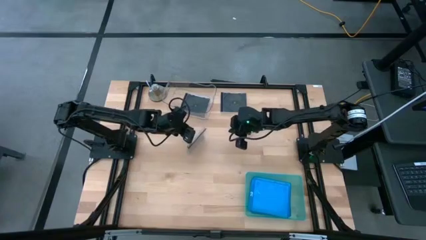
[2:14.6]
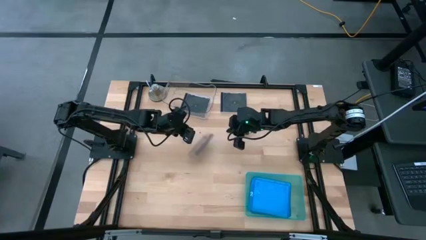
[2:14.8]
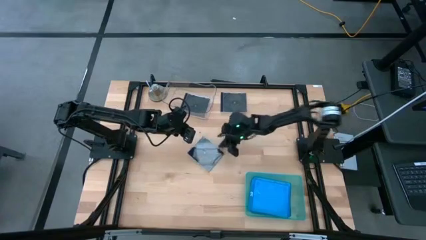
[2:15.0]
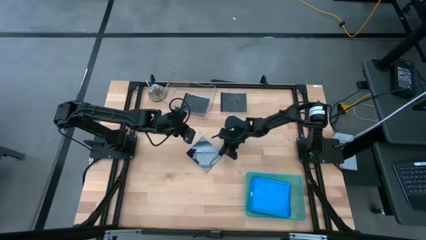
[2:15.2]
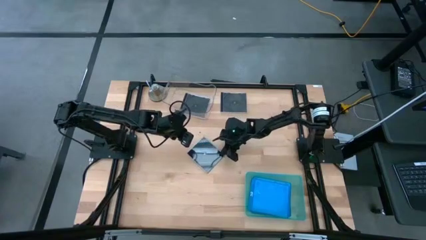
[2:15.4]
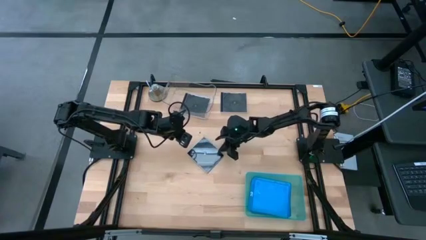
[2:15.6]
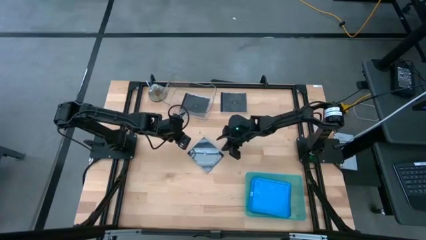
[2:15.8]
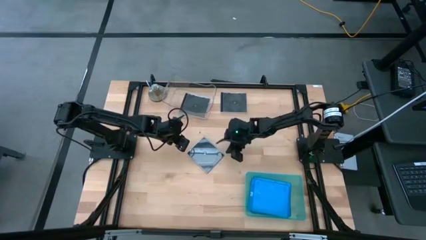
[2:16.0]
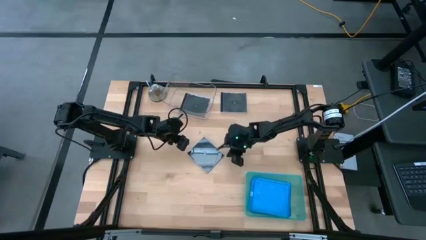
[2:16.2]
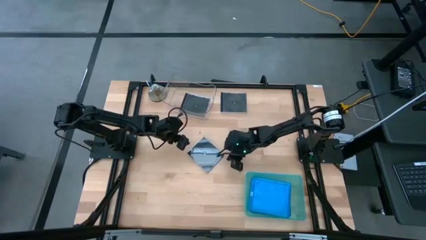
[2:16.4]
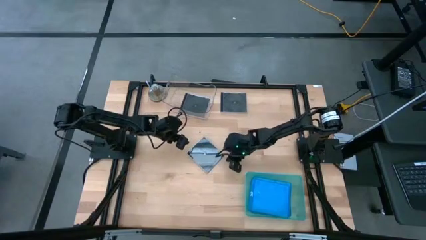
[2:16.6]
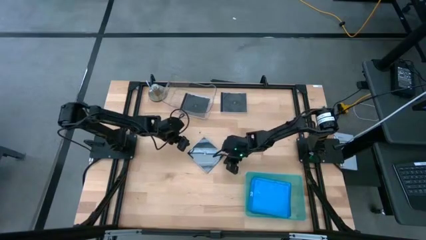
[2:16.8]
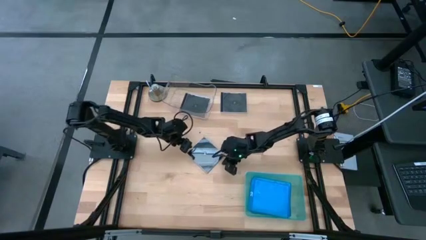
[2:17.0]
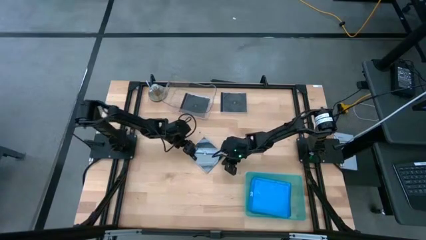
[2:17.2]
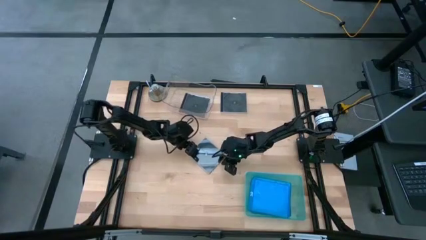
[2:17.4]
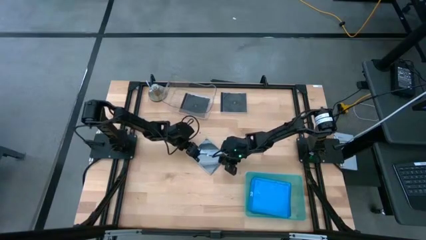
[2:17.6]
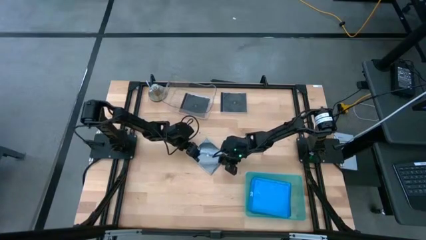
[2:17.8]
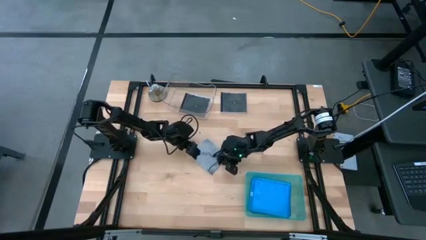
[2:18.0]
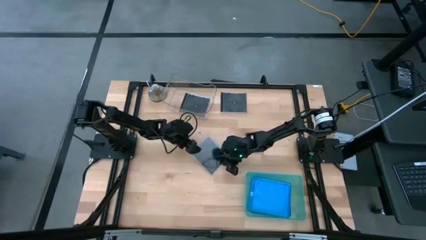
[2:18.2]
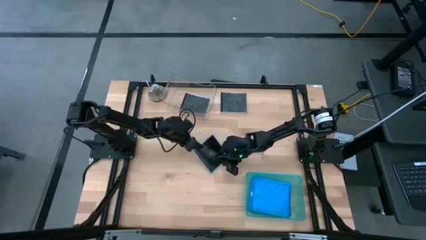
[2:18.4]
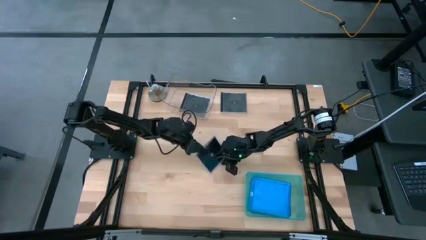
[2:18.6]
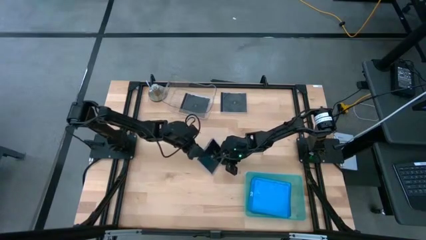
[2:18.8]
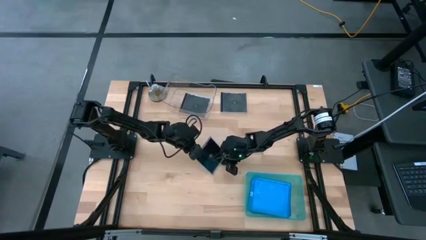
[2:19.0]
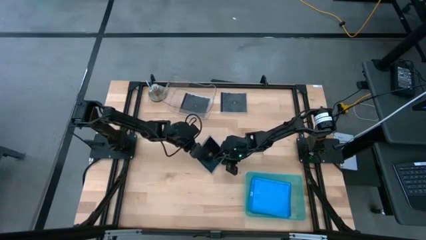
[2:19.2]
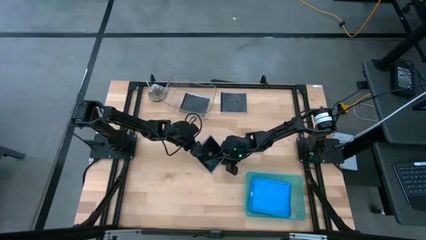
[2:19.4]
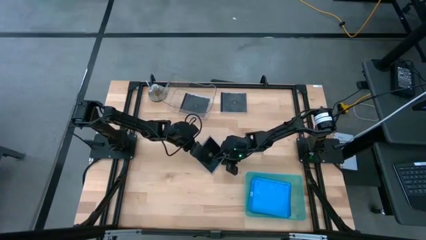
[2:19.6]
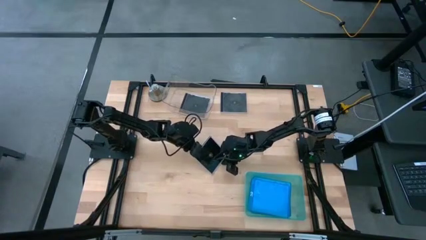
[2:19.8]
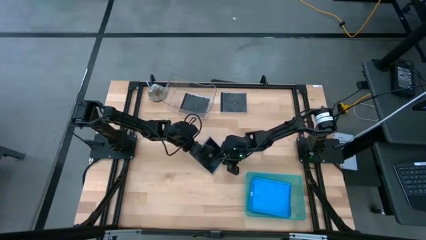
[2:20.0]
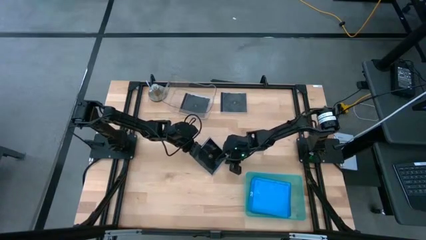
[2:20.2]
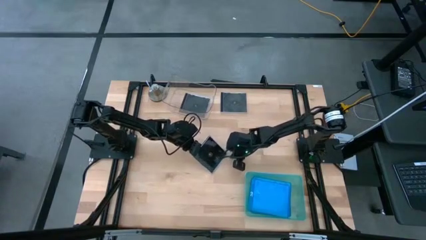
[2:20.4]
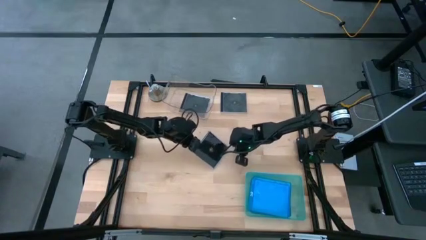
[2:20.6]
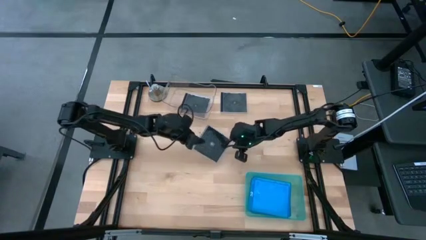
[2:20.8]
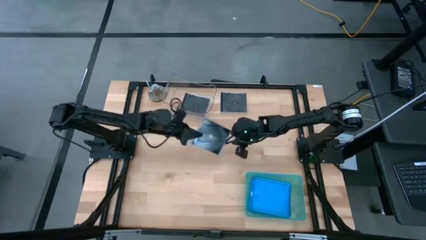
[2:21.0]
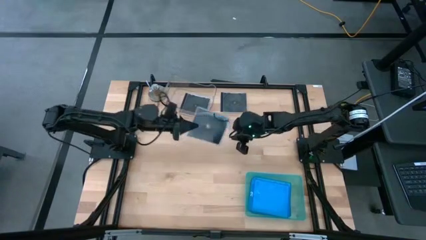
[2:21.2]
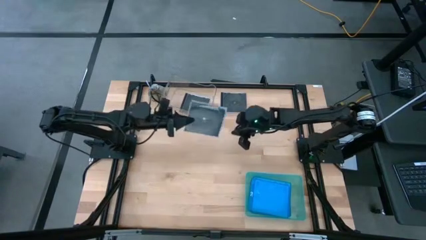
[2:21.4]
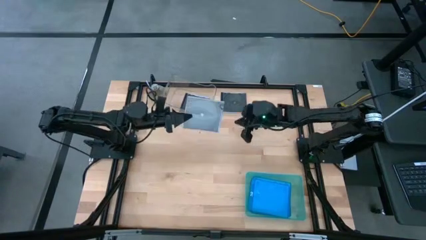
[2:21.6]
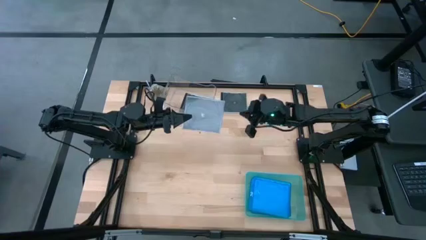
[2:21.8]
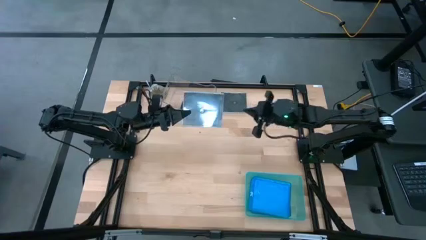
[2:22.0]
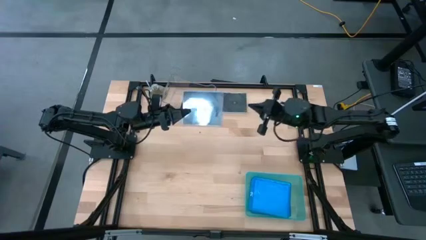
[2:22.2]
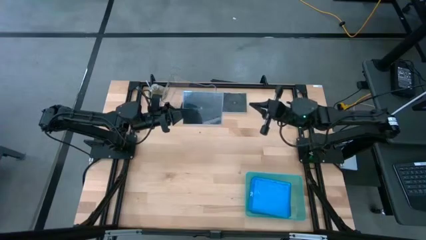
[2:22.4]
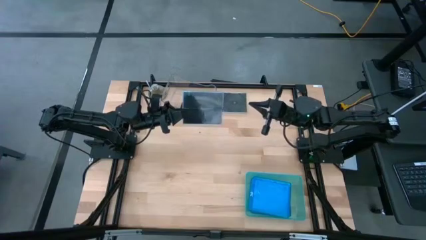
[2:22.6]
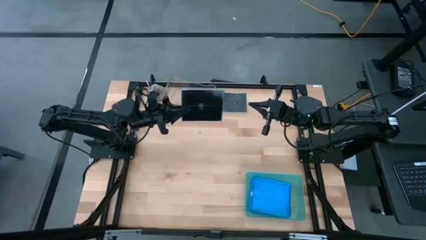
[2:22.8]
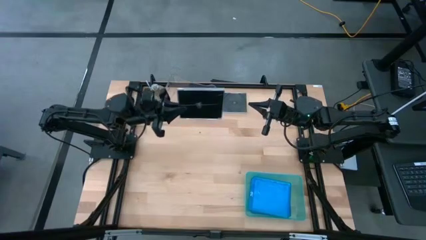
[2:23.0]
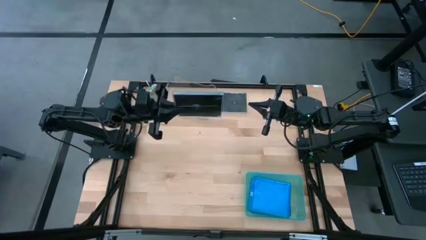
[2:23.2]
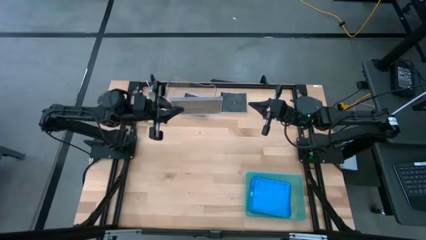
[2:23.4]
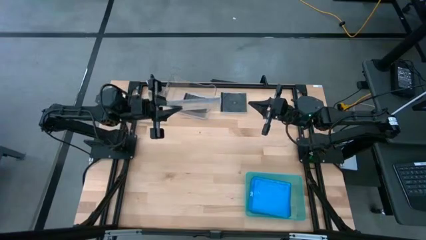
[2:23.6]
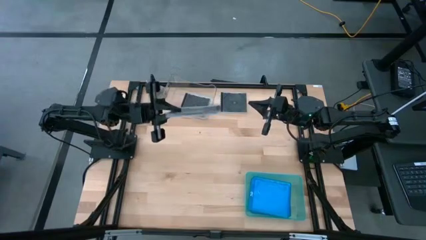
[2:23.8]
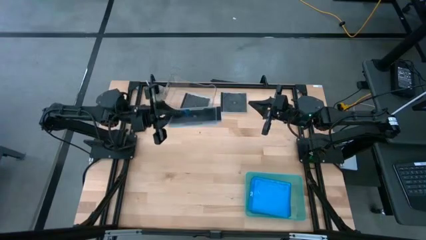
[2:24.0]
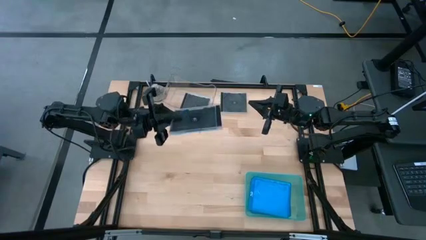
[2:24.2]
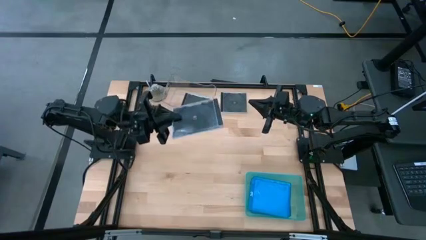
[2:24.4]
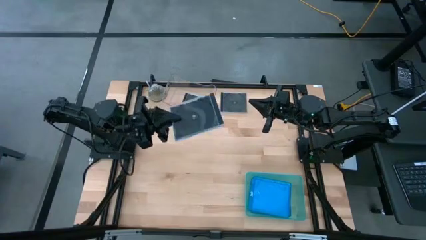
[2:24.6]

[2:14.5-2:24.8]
Task: Pick & place jewel cases by type
Put the bottom black cd case into the transparent bin

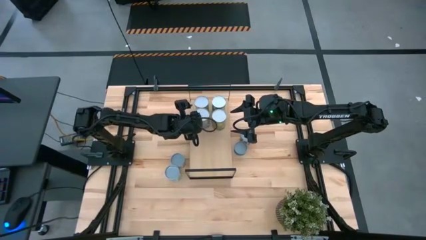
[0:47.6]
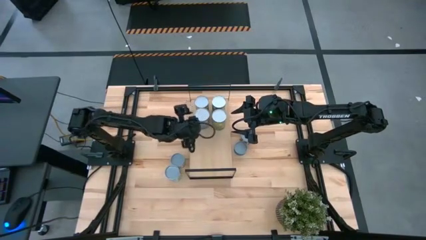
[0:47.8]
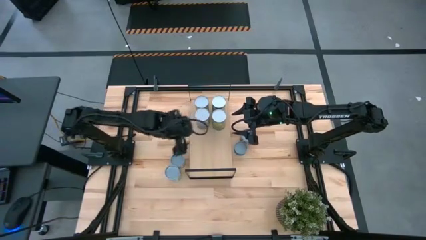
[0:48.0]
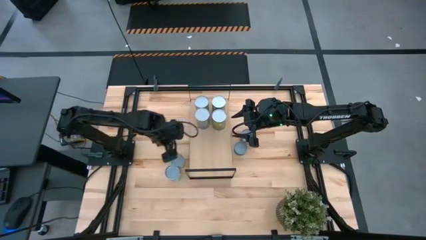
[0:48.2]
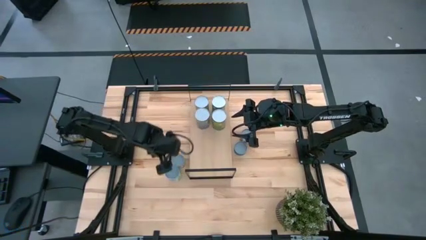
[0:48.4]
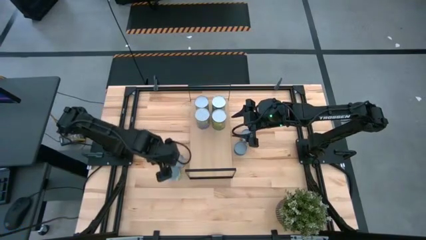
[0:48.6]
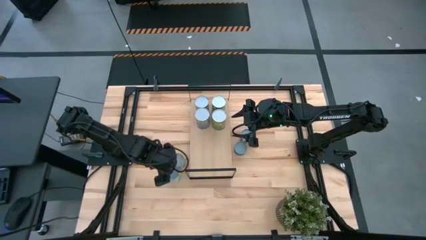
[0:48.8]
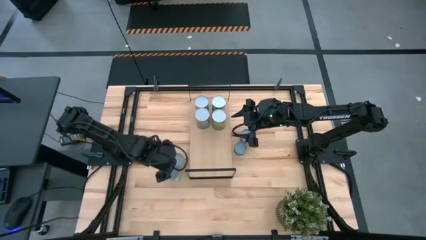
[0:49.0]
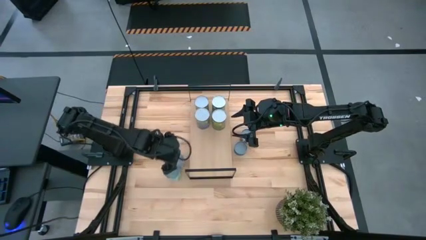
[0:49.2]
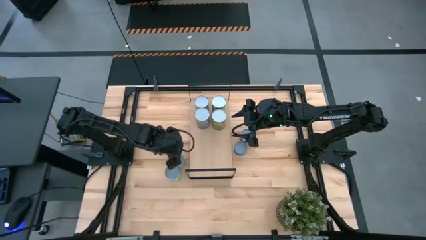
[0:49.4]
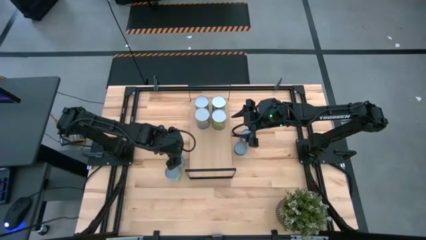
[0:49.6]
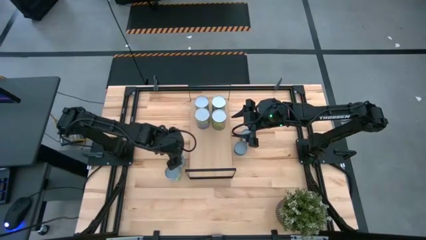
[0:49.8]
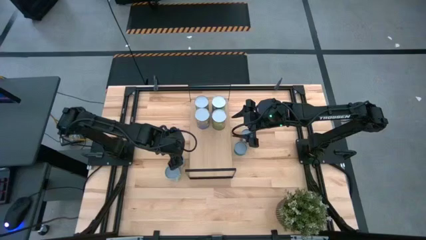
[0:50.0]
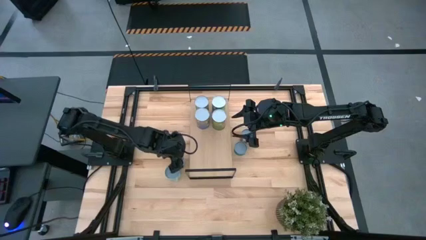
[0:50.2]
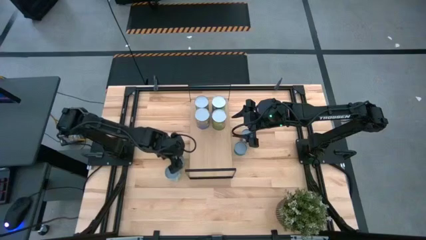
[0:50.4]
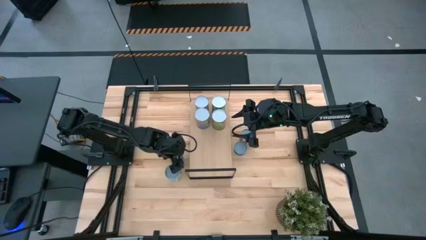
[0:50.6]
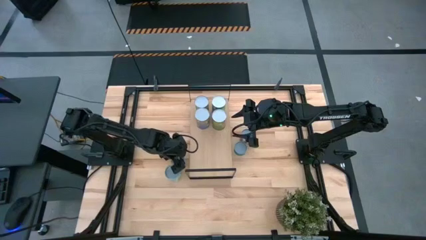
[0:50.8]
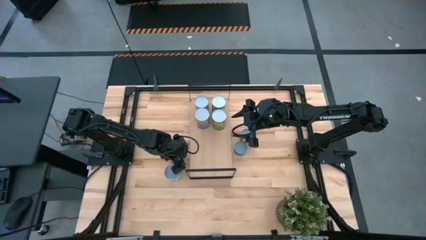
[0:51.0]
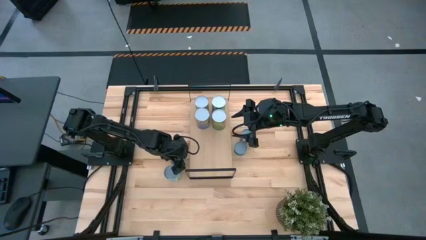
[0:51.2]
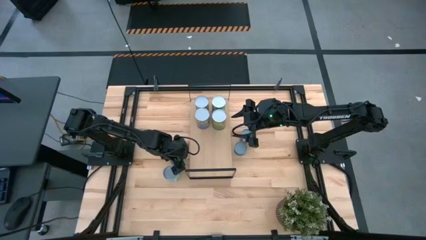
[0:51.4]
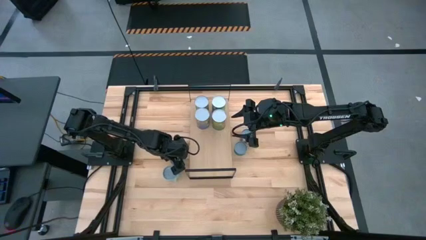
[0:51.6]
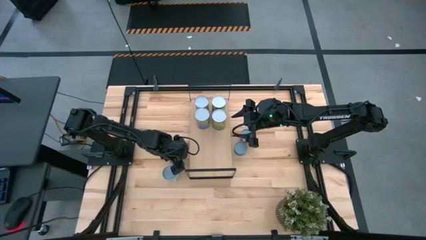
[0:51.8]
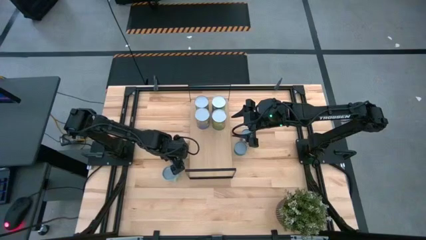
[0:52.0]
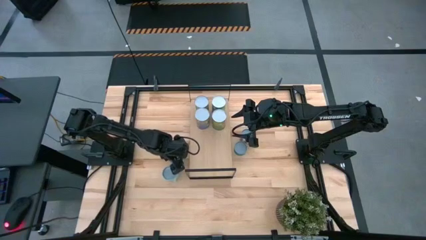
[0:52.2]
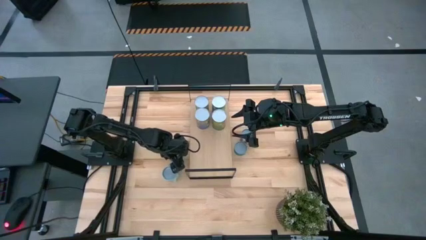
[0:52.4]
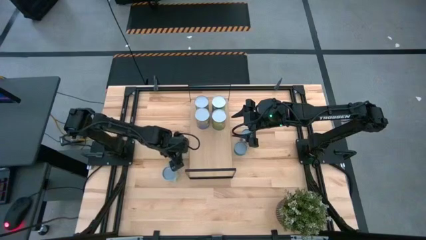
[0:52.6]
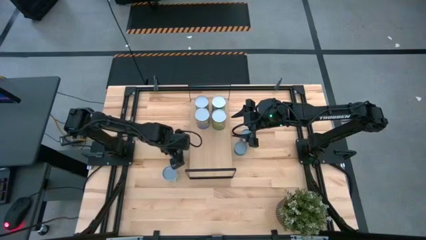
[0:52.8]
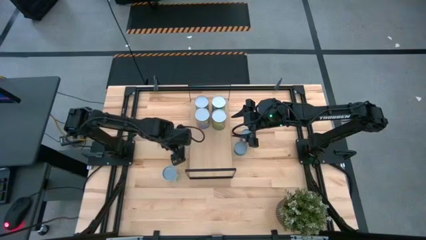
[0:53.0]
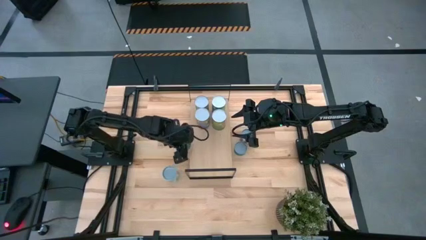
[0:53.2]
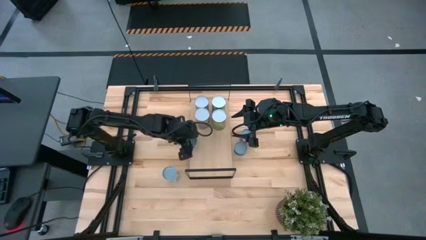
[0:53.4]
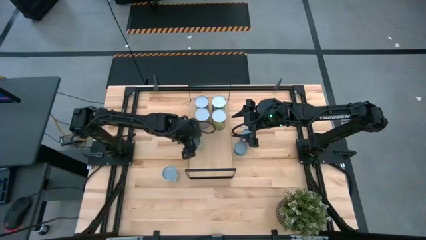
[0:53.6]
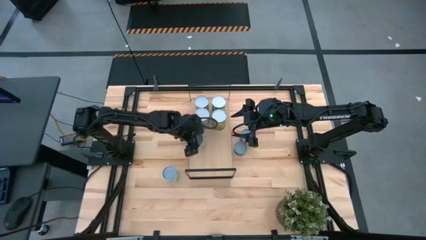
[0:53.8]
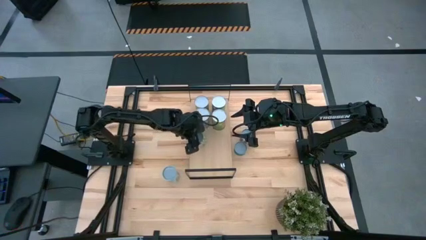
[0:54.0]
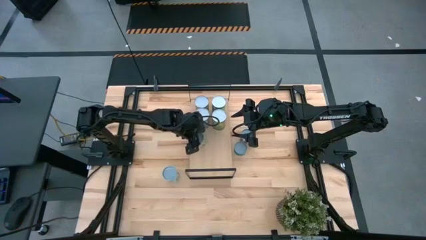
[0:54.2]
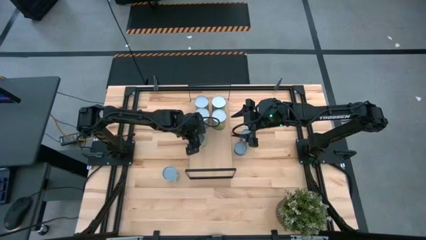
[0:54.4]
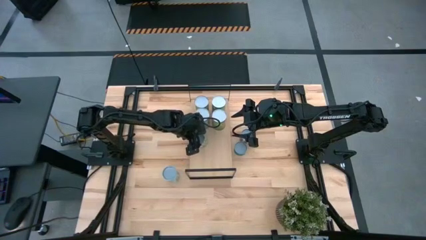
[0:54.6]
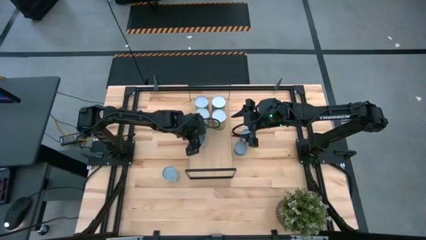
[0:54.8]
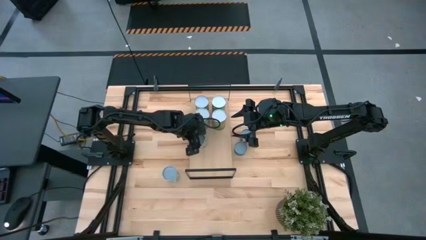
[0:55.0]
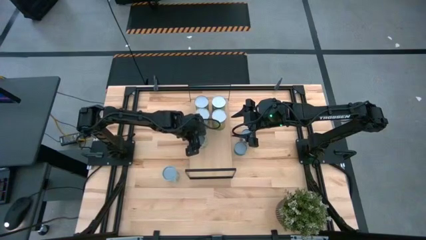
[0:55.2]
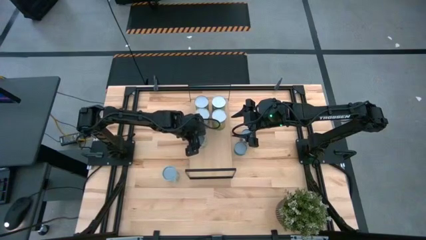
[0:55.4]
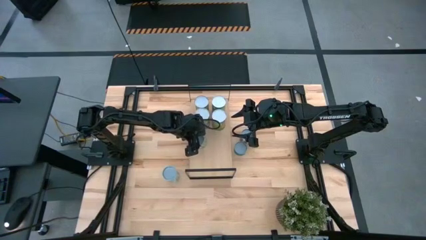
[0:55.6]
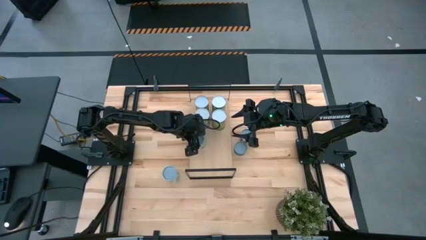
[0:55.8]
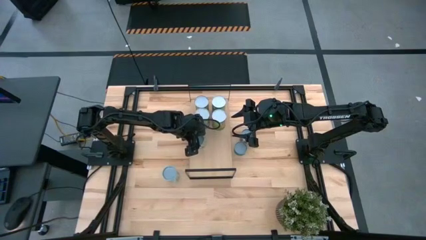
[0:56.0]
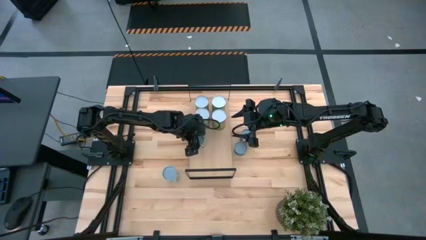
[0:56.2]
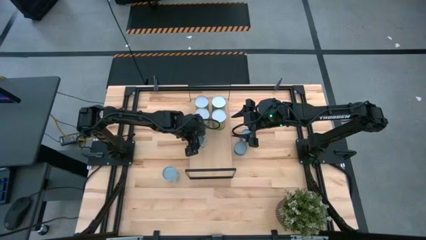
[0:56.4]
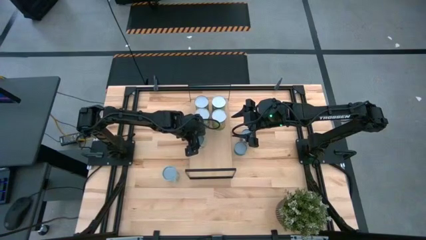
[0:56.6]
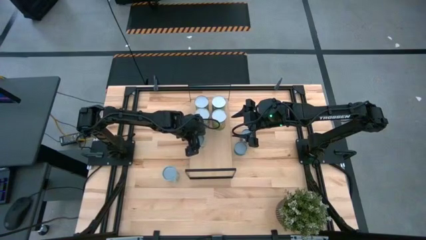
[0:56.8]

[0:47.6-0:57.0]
Task: Pick and place cans onto a shelf
Put the canned green peas onto the shelf
